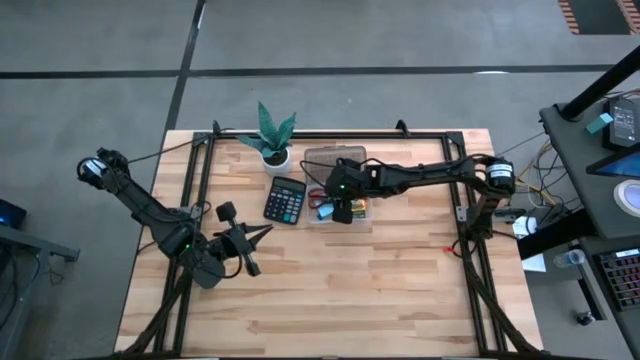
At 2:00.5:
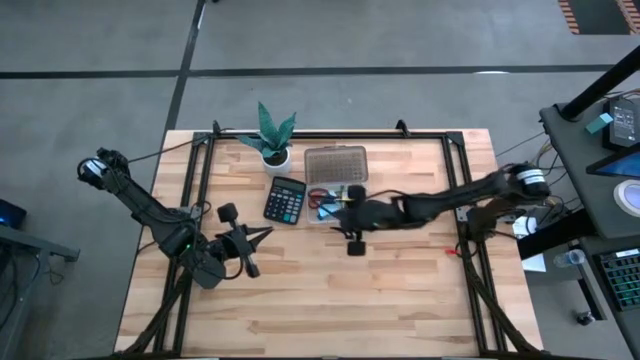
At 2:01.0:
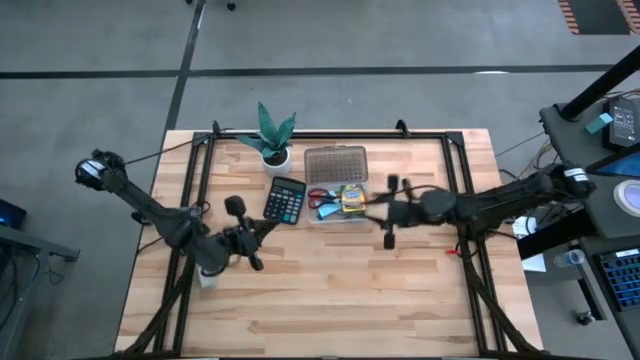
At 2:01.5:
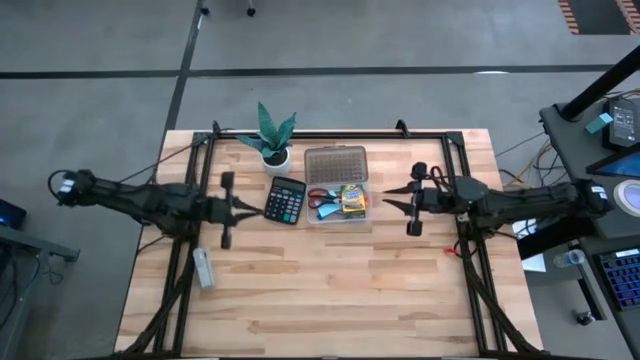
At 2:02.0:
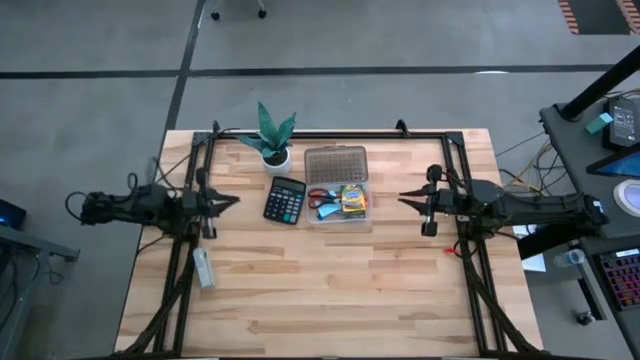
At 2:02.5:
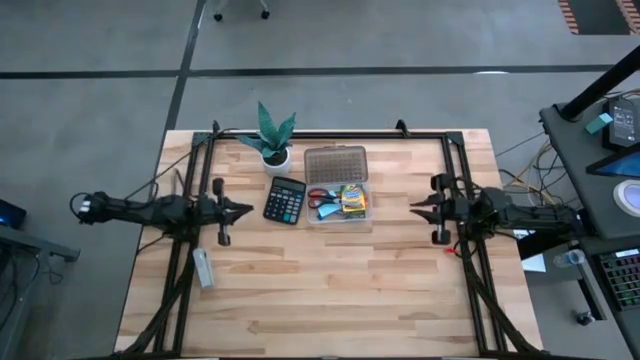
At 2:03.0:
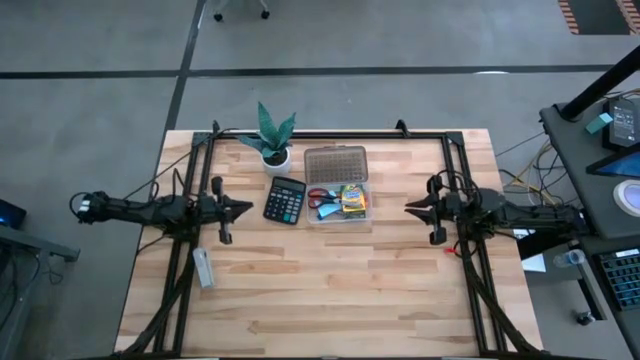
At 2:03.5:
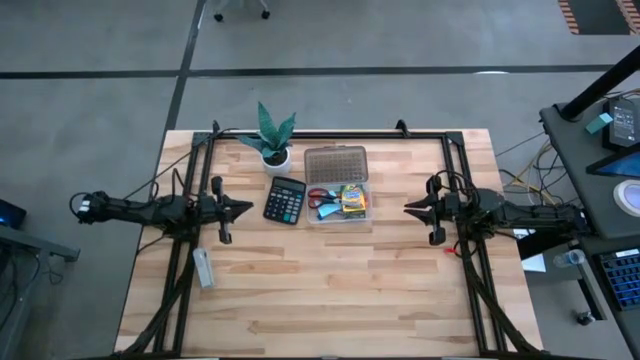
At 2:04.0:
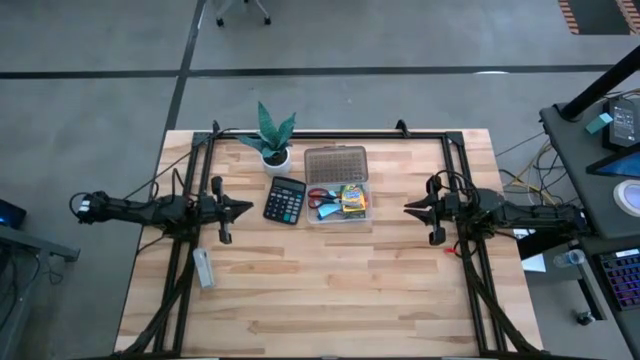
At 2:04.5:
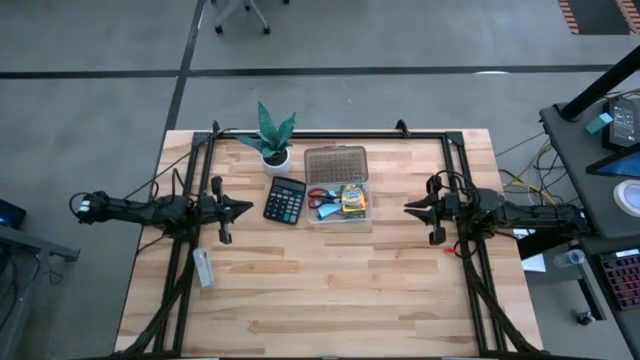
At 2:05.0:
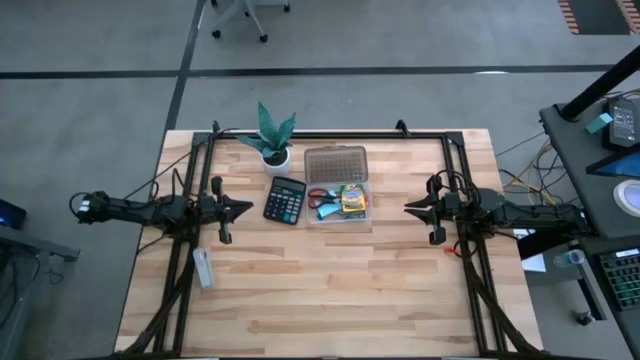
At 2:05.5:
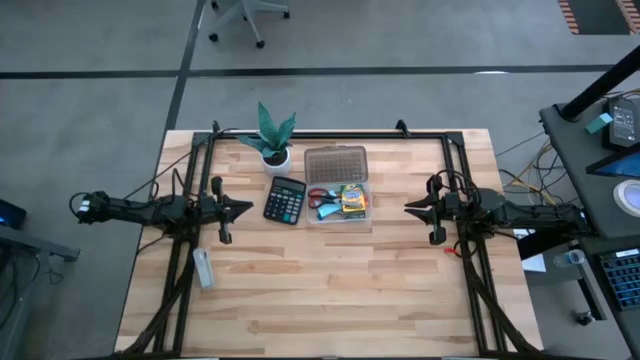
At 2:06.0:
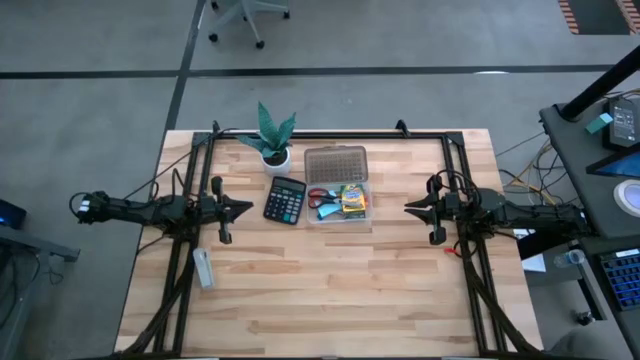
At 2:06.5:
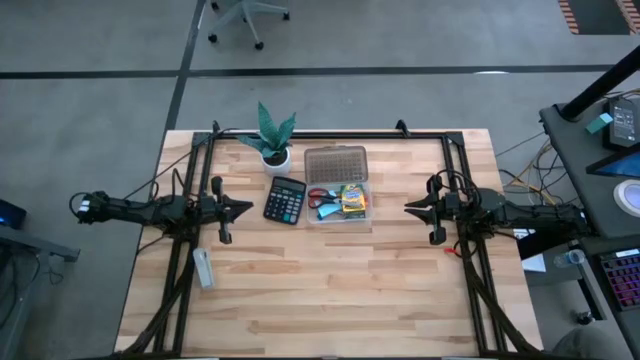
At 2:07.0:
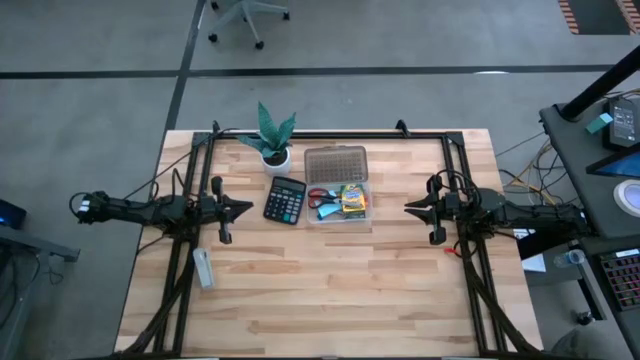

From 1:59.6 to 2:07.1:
Task: Pack school essentials
Return to home position
